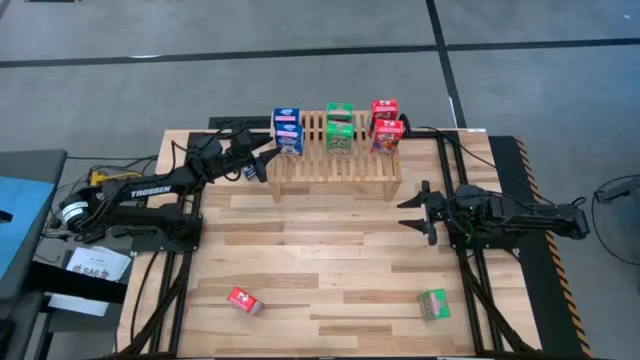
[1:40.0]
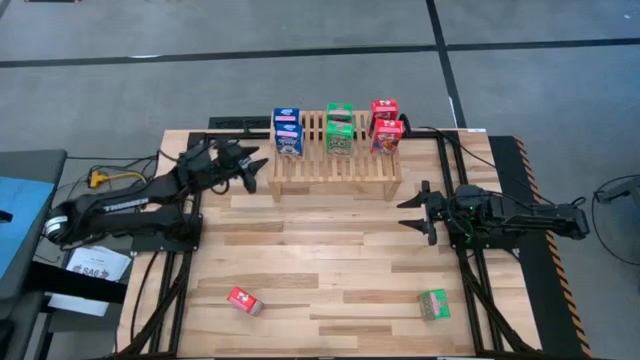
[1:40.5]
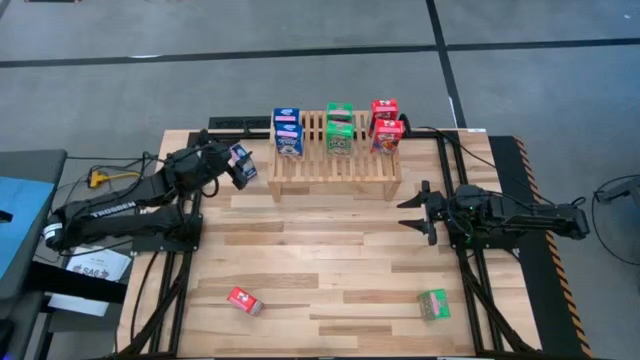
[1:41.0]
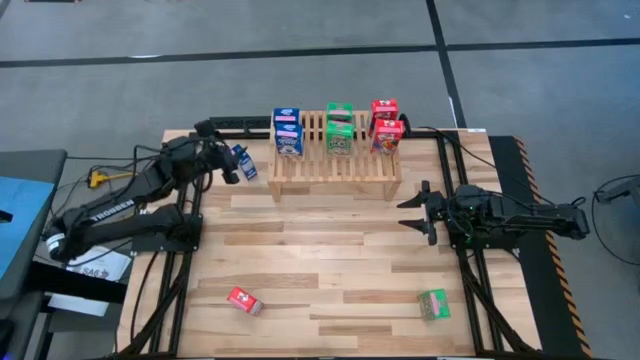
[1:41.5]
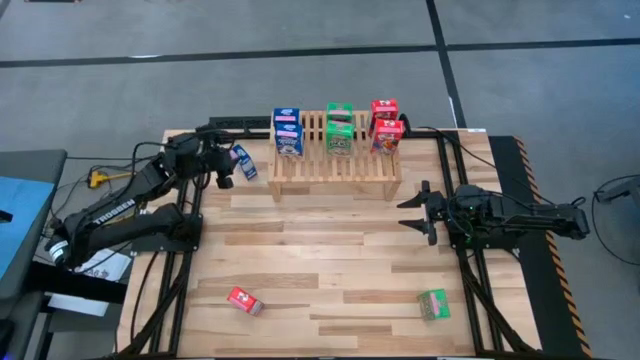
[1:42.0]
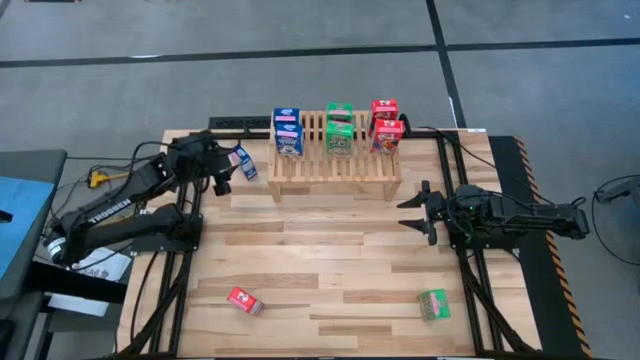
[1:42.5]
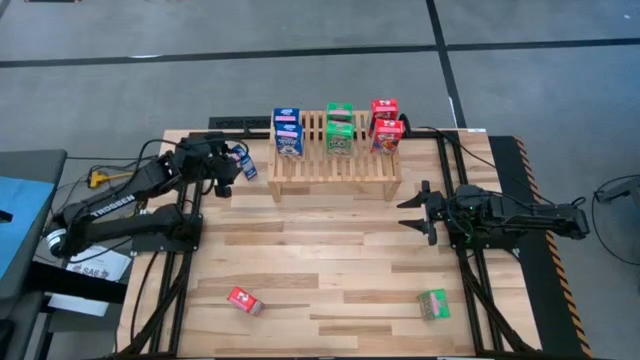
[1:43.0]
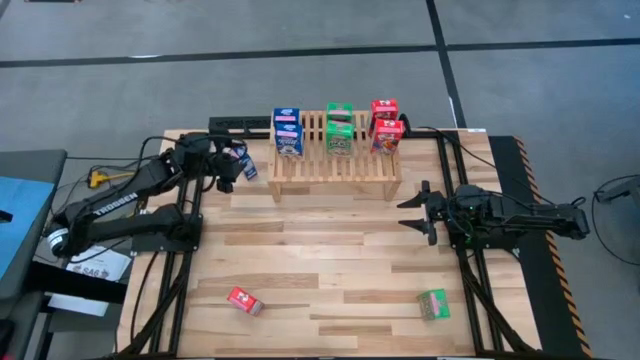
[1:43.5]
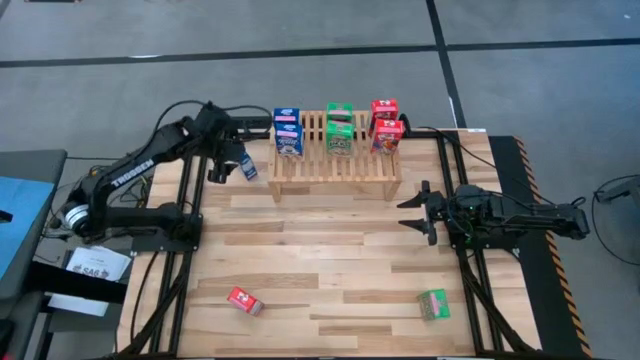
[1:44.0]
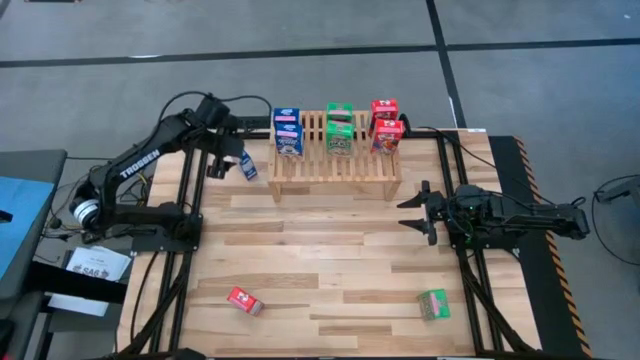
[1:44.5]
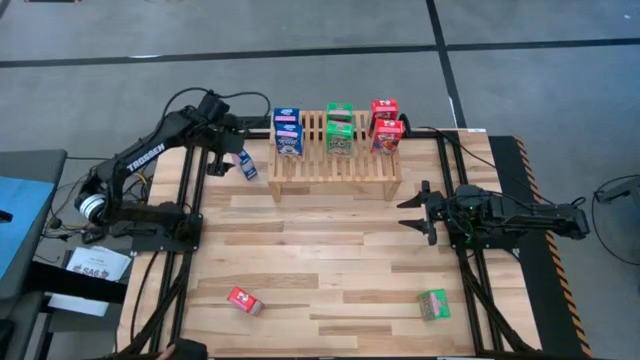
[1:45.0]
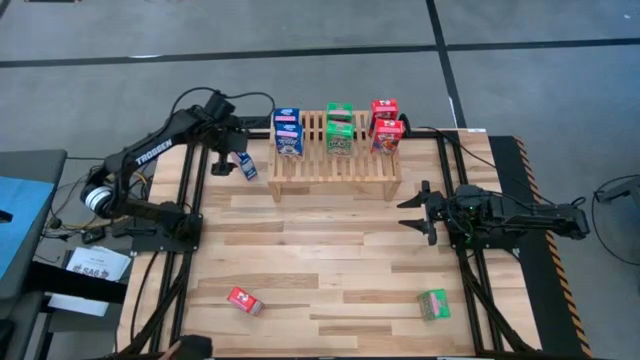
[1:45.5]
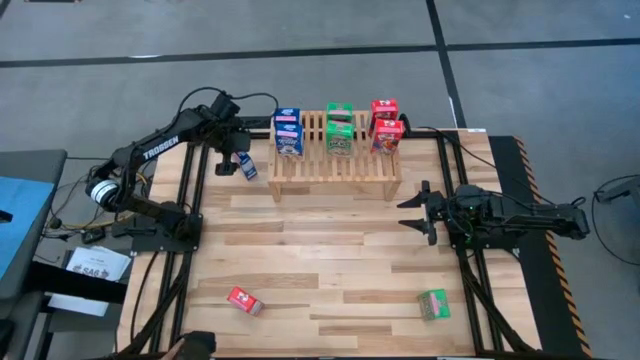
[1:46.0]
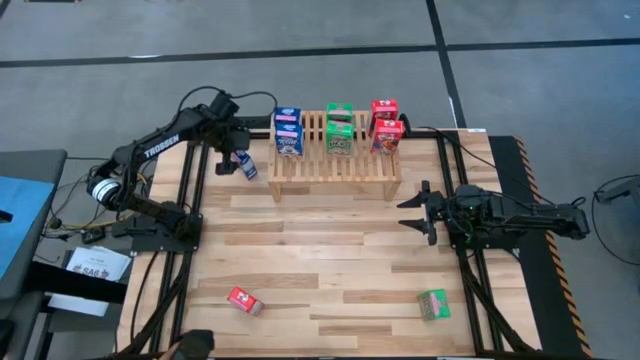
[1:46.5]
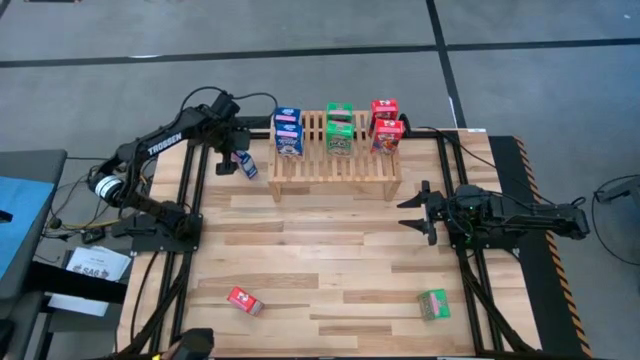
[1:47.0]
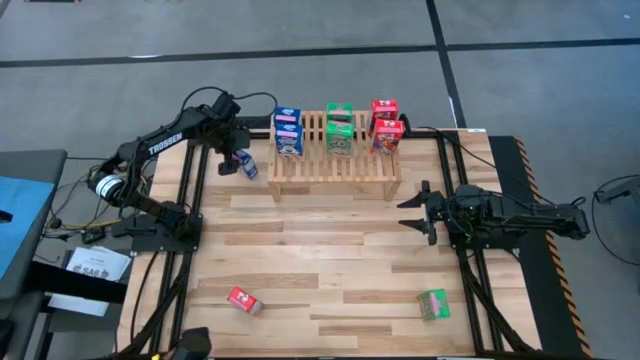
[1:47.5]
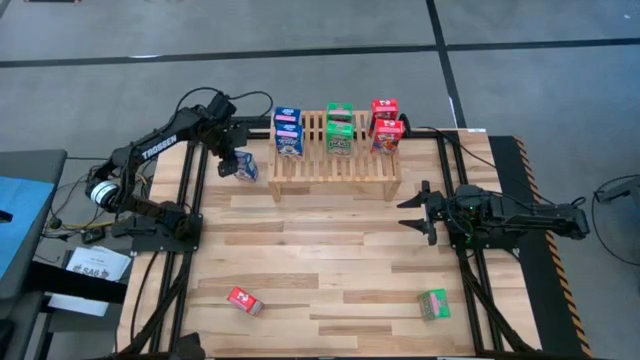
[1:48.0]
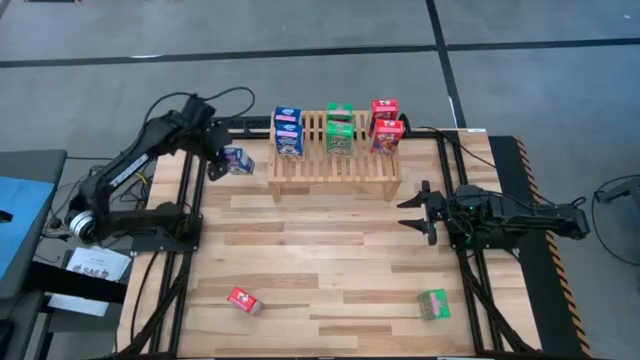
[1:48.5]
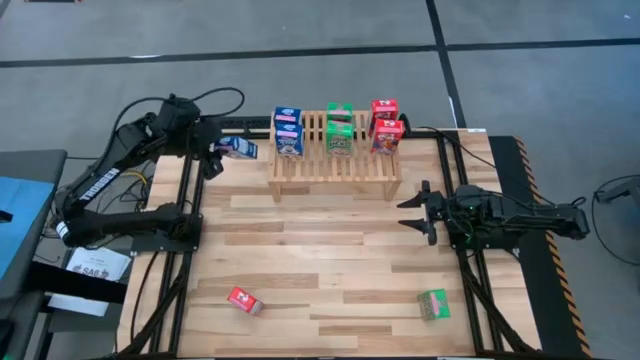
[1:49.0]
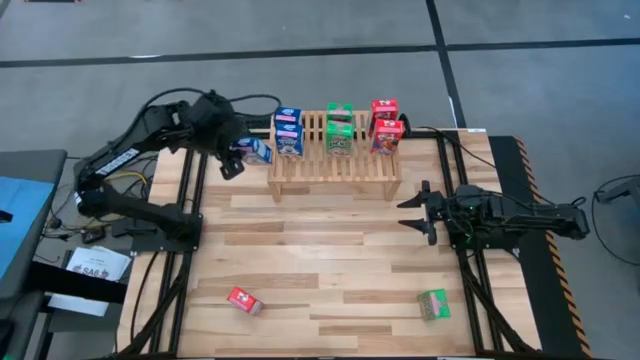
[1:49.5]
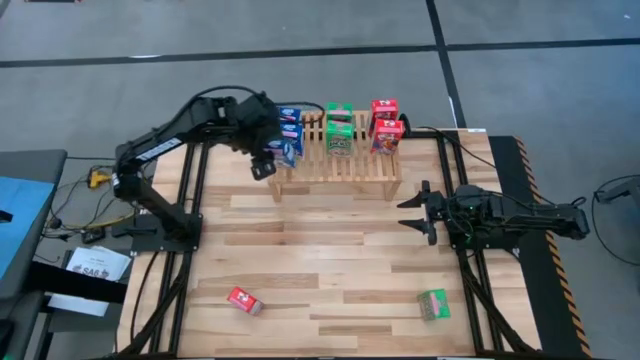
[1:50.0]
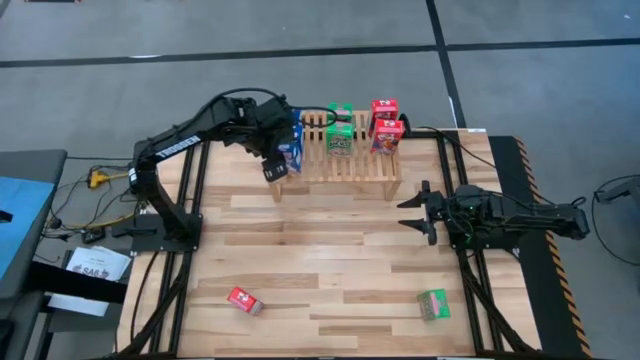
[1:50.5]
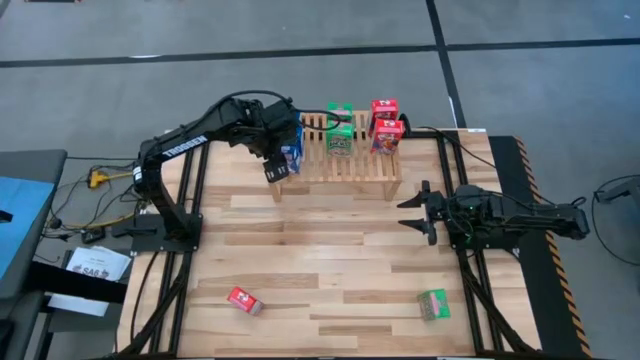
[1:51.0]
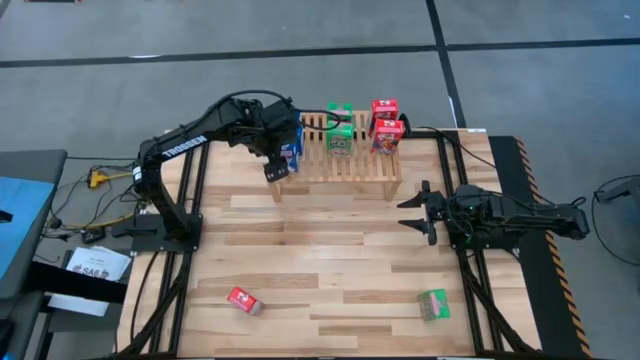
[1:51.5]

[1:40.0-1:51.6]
Task: Stack cereal on shelf
Put the blue cereal box on the shelf aligned with the other blue cereal boxes

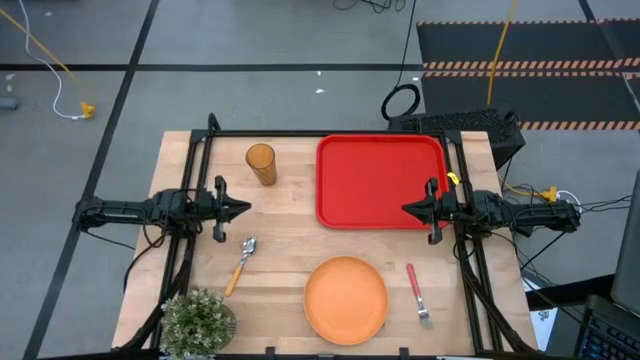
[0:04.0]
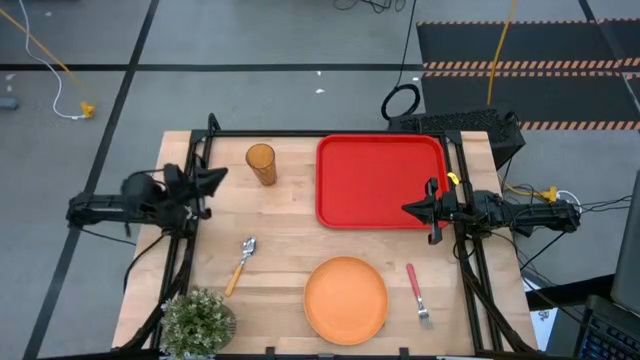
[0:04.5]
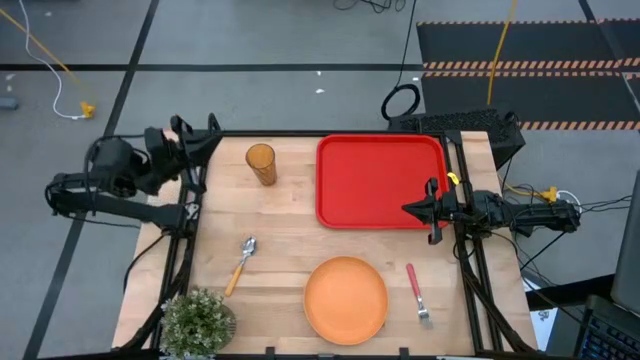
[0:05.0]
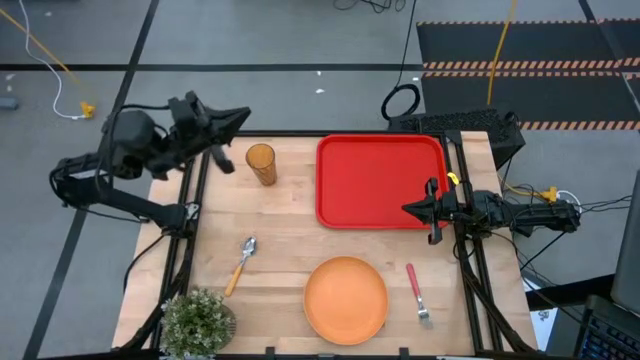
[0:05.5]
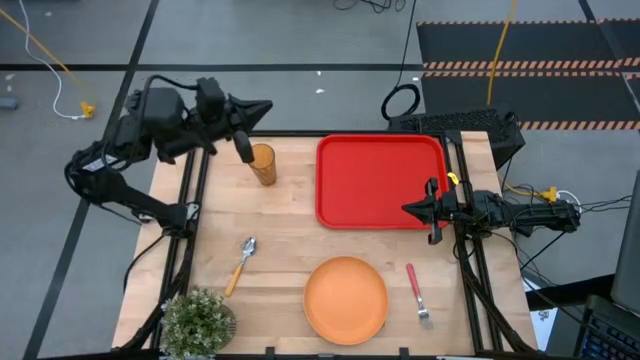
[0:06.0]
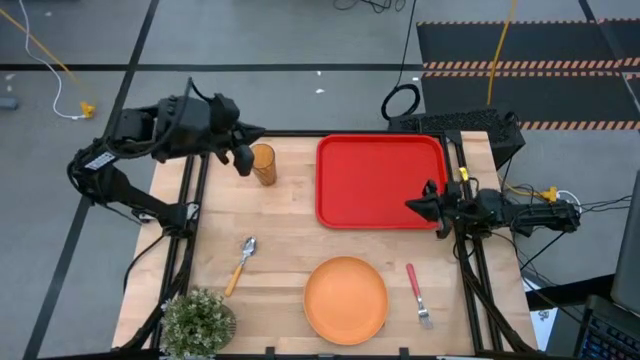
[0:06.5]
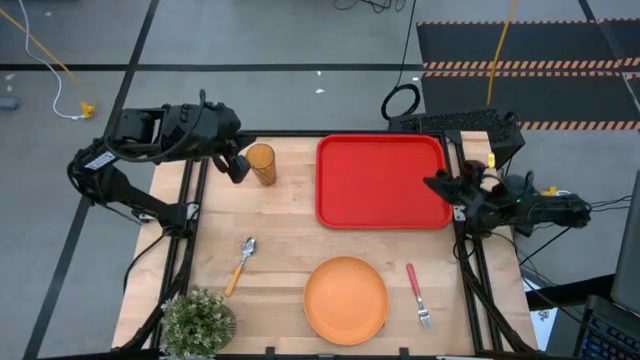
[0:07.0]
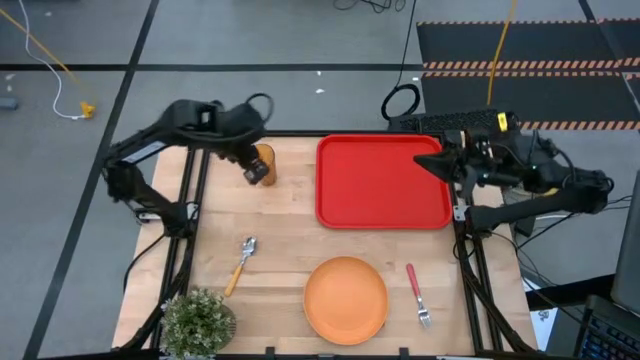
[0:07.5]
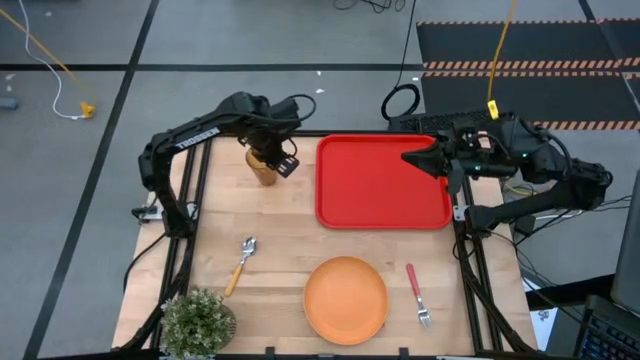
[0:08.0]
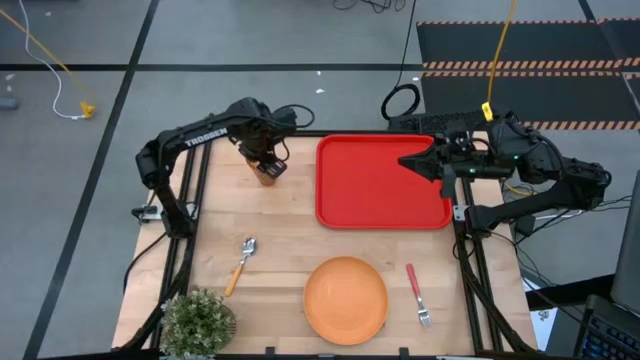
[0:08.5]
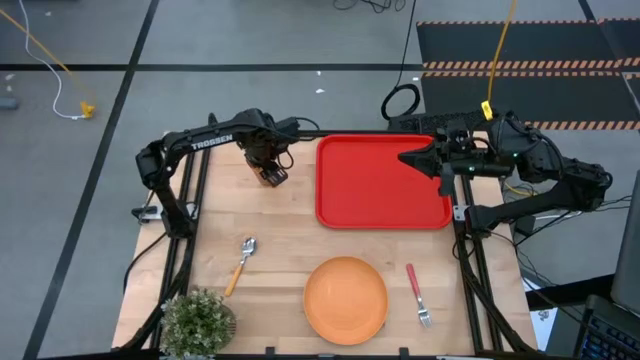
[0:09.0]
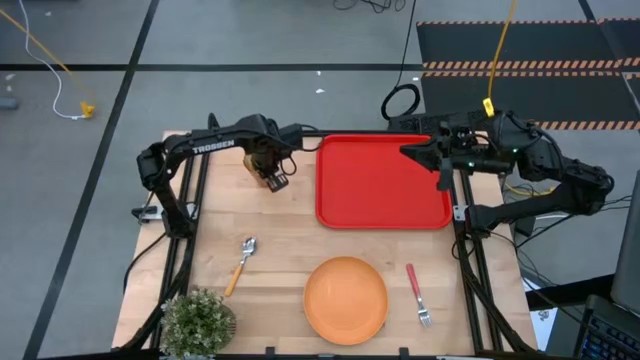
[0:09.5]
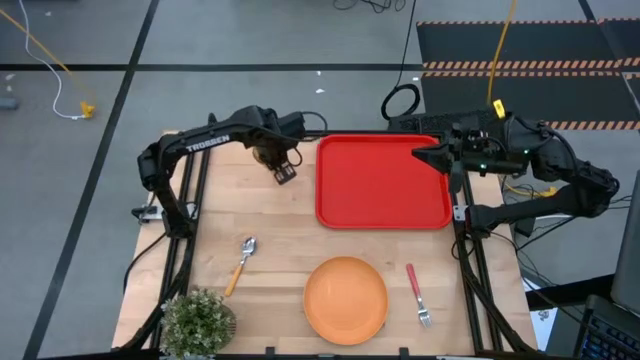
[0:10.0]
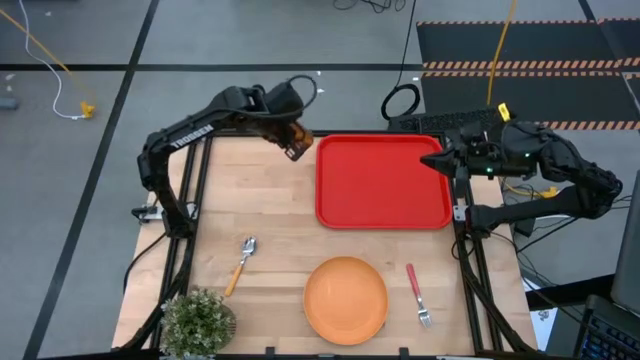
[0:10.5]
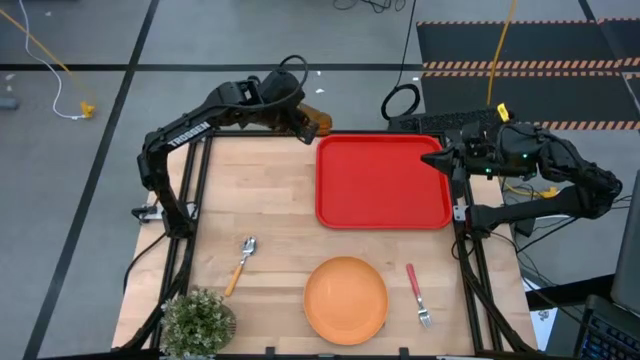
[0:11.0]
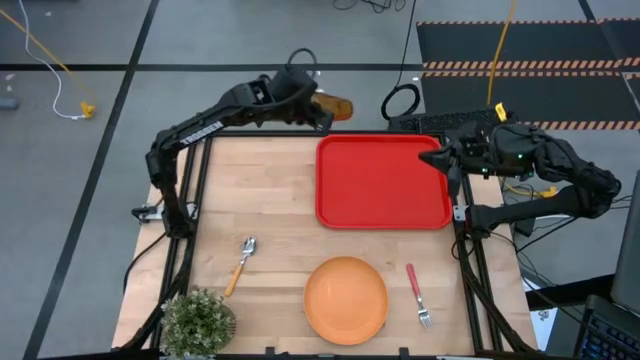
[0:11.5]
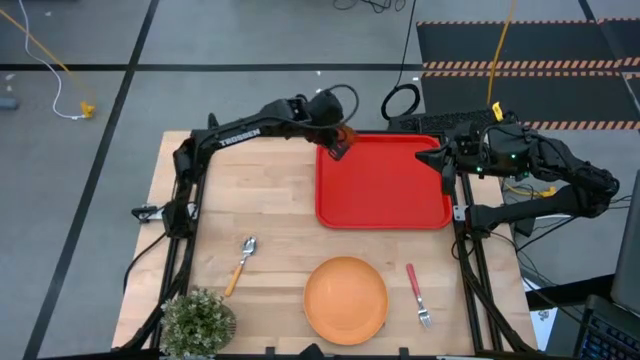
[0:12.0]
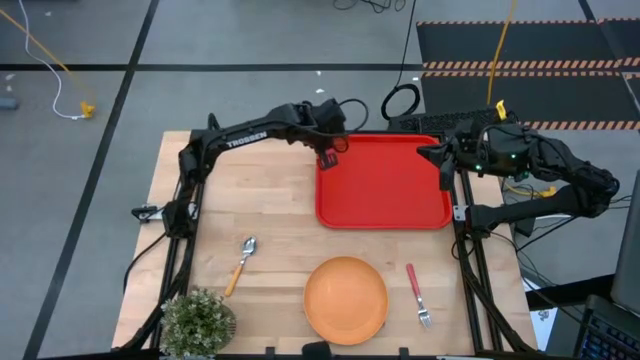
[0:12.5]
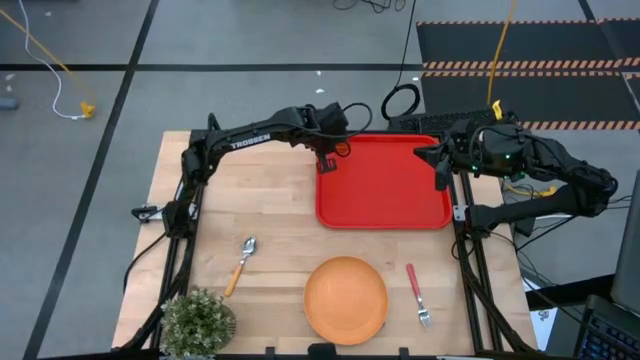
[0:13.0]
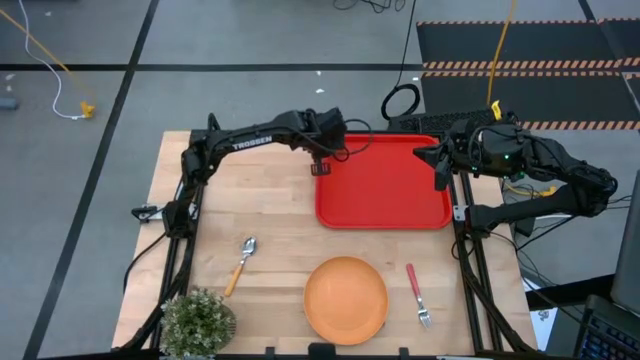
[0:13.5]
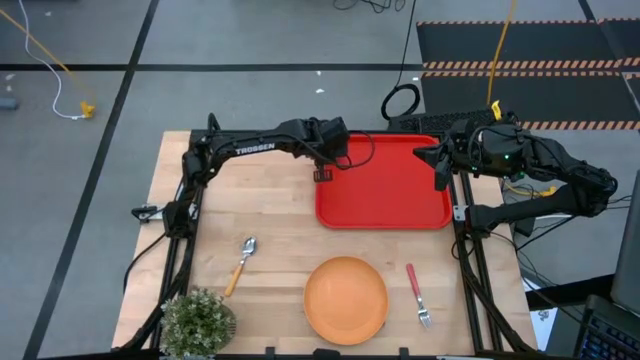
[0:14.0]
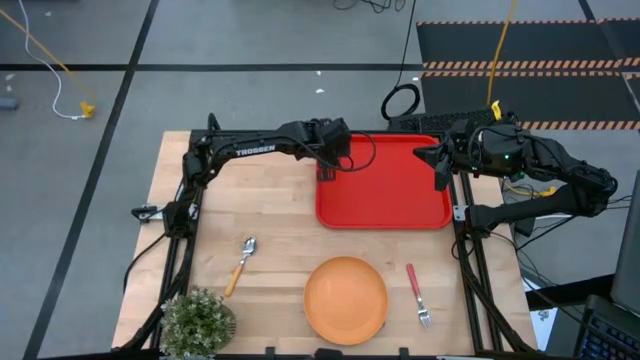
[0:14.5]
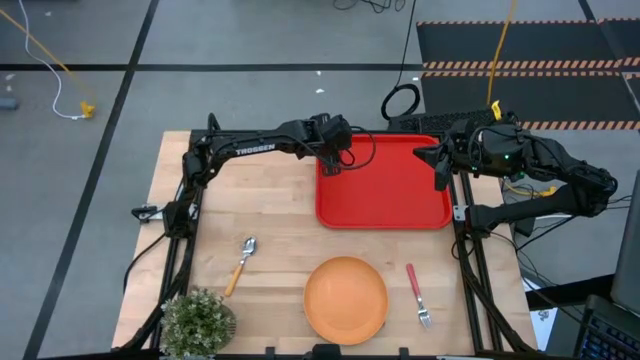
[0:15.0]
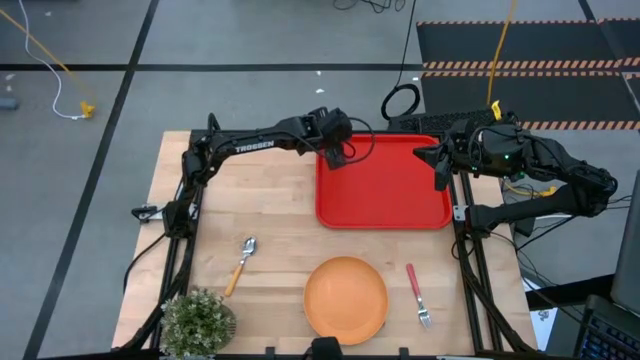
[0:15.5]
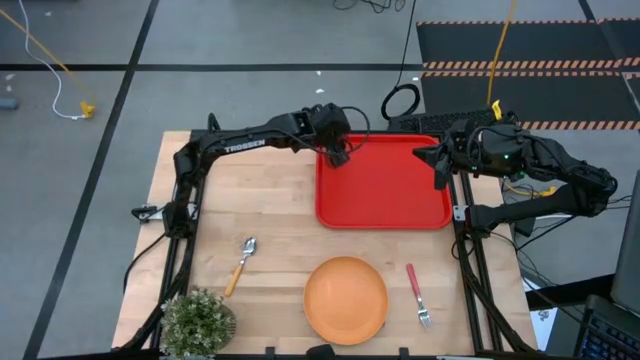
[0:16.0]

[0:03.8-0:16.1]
Task: Pick and place plate/cup/fork/spoon on tray
Put the brown cup on the red tray
